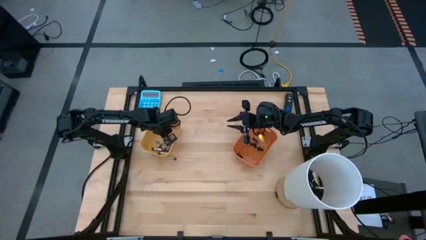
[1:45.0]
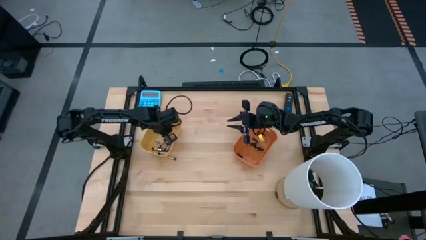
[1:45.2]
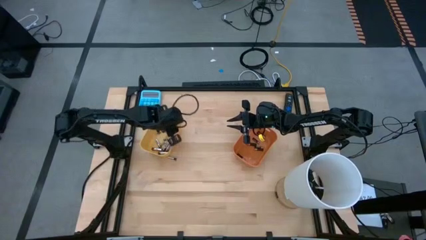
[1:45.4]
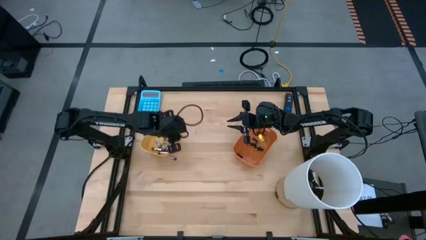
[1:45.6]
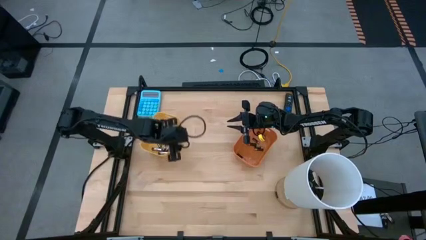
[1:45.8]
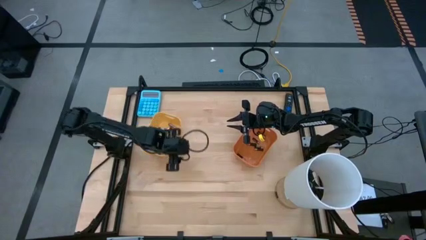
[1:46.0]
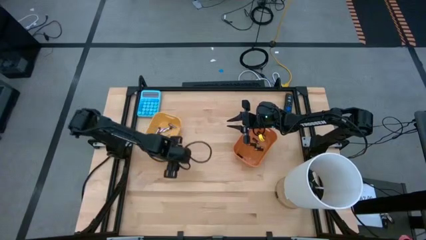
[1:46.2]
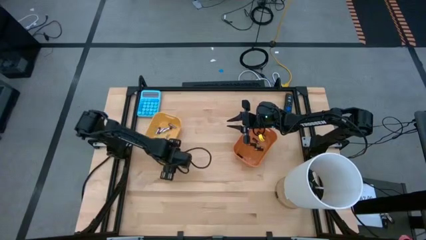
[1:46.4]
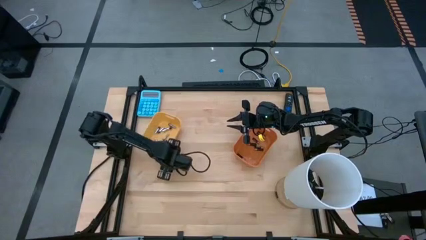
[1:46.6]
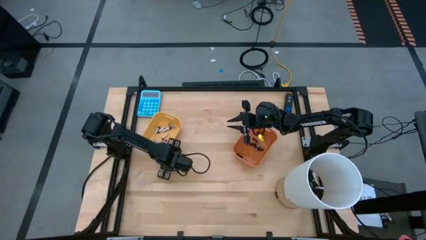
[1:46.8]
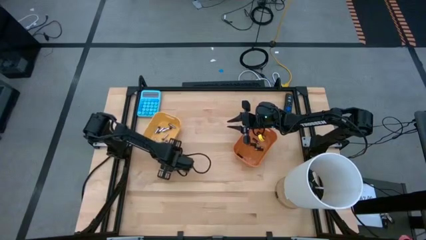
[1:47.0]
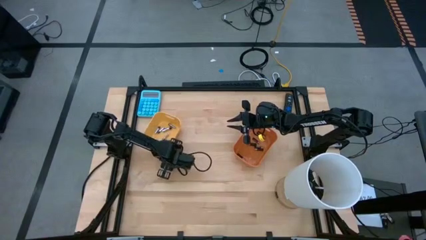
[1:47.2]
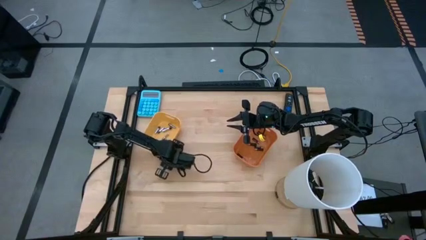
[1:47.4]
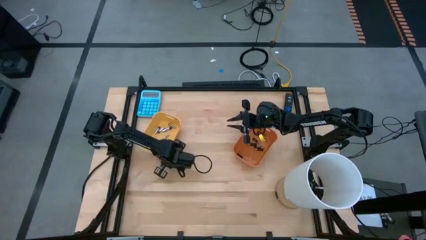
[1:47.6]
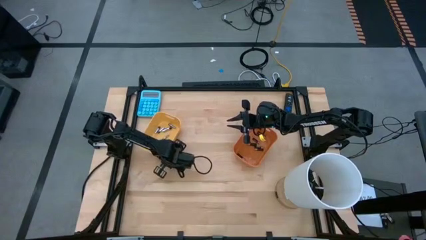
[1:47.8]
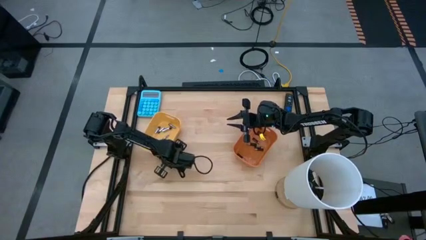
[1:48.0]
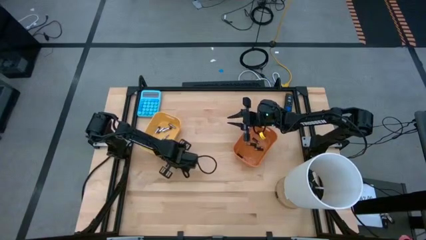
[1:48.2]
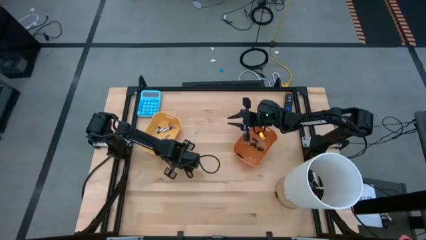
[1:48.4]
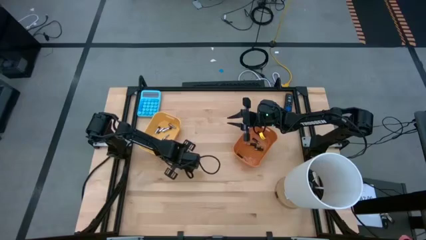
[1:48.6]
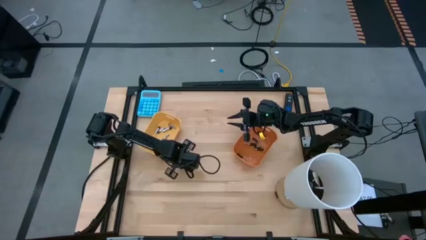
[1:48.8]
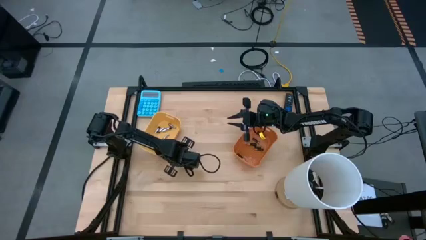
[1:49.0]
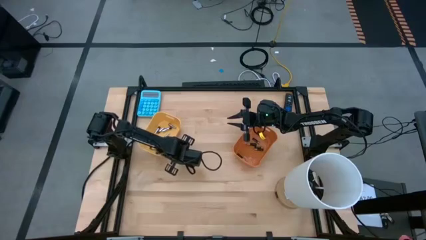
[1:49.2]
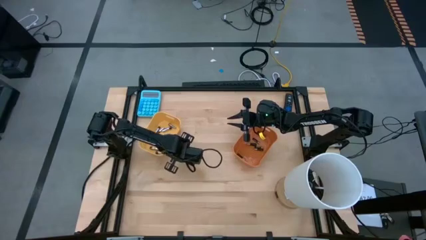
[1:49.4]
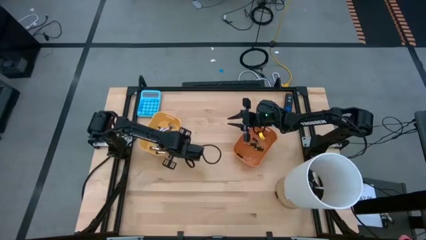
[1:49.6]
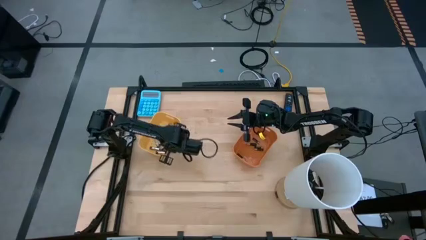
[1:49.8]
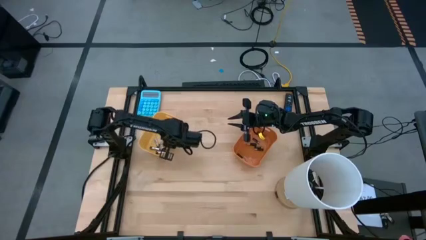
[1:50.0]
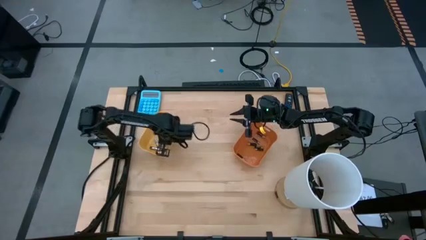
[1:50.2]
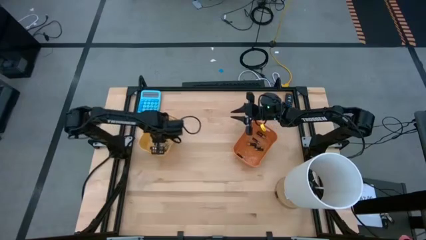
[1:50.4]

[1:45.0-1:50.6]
Task: Sort batteries
Put the silver battery into the yellow bin

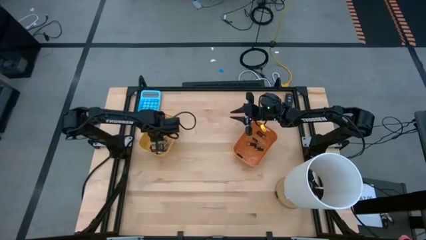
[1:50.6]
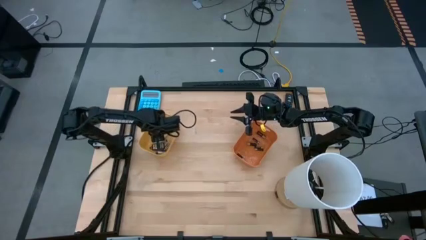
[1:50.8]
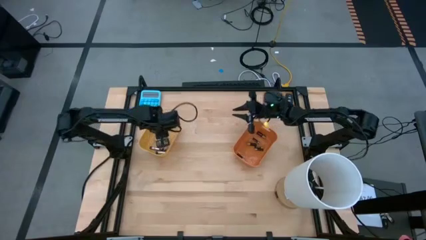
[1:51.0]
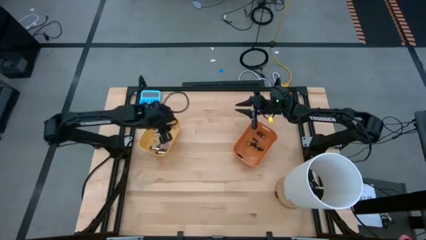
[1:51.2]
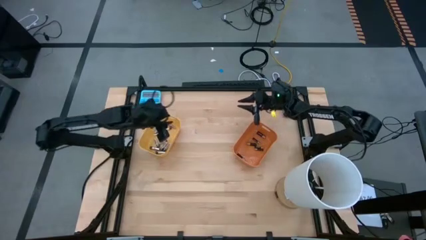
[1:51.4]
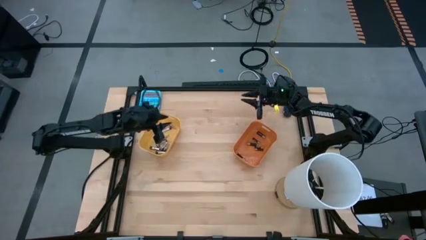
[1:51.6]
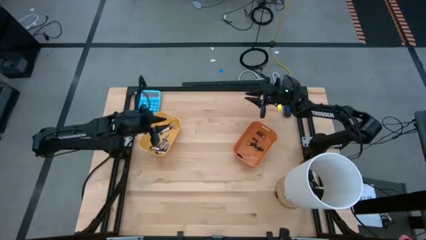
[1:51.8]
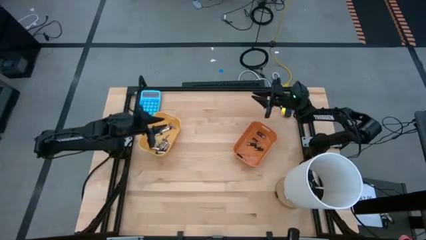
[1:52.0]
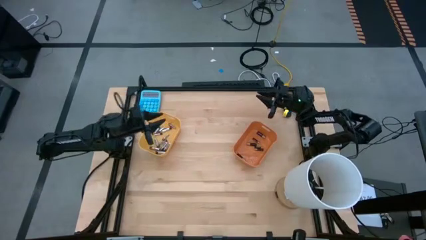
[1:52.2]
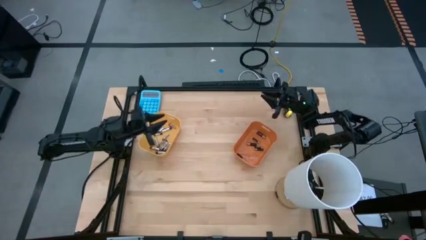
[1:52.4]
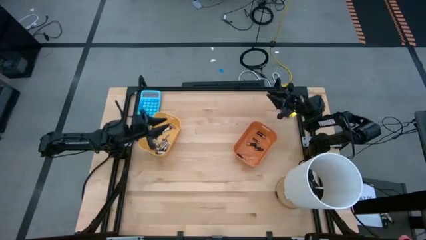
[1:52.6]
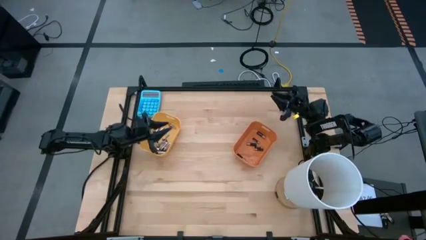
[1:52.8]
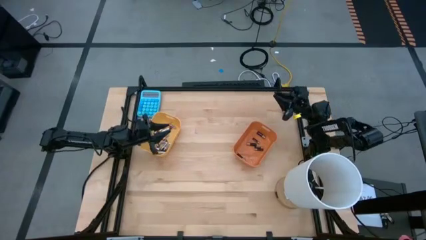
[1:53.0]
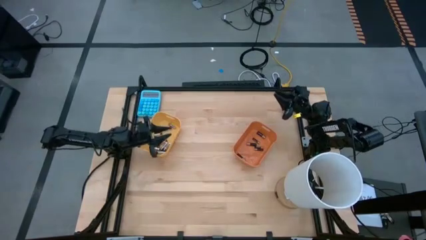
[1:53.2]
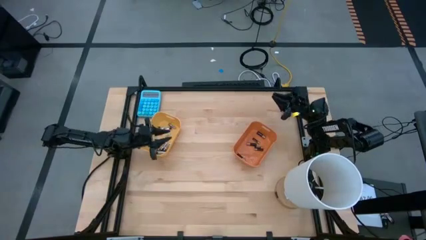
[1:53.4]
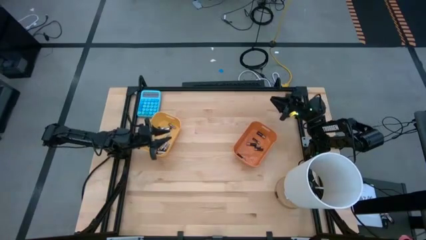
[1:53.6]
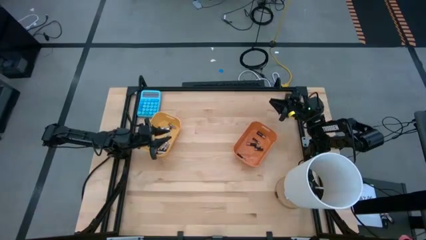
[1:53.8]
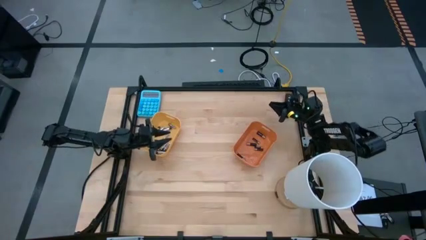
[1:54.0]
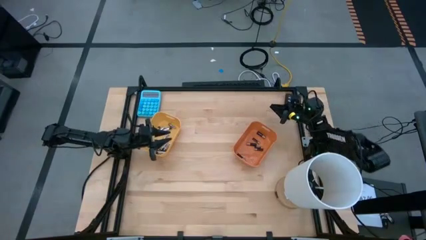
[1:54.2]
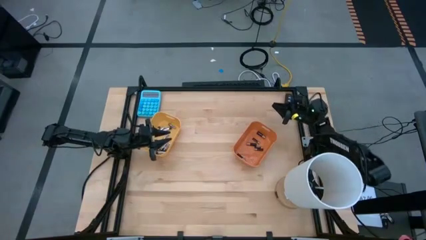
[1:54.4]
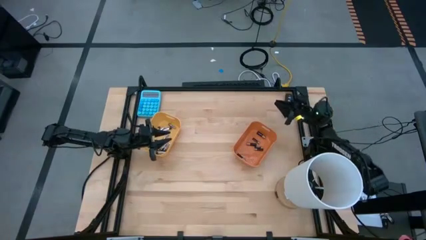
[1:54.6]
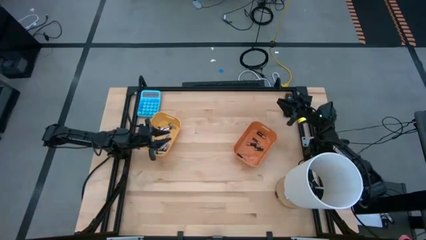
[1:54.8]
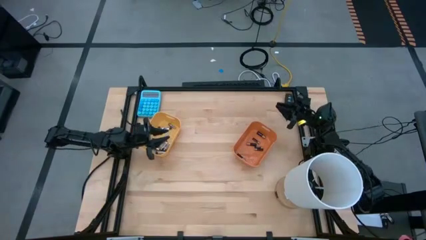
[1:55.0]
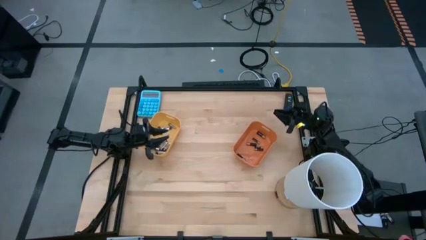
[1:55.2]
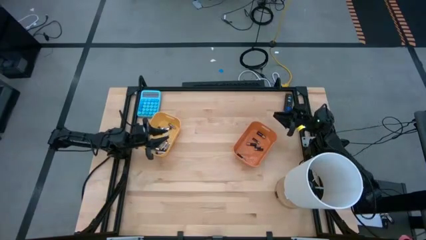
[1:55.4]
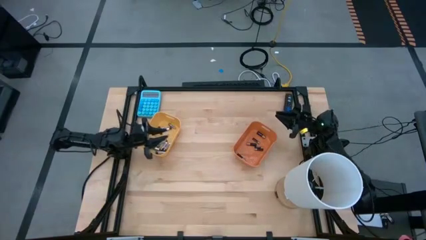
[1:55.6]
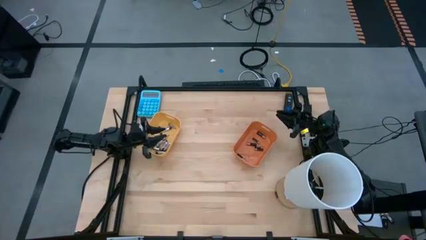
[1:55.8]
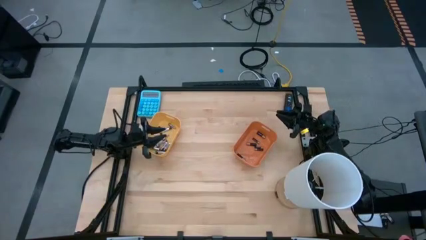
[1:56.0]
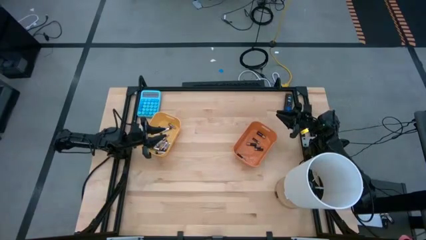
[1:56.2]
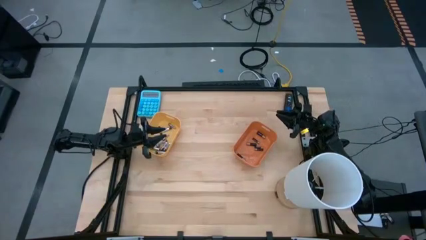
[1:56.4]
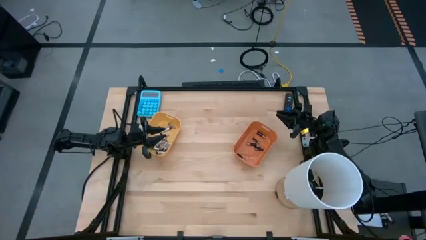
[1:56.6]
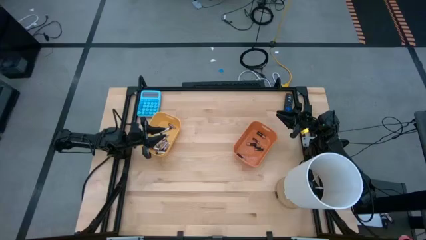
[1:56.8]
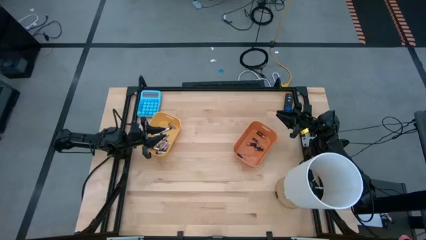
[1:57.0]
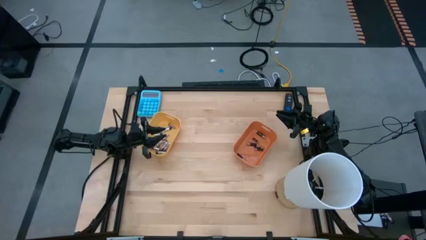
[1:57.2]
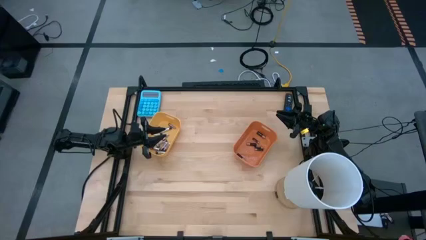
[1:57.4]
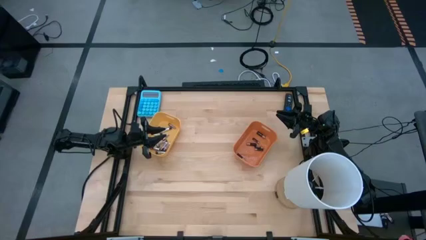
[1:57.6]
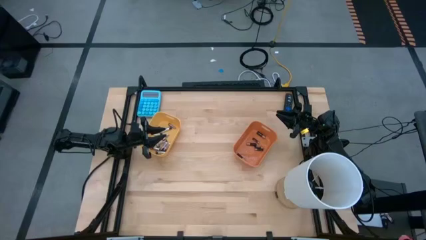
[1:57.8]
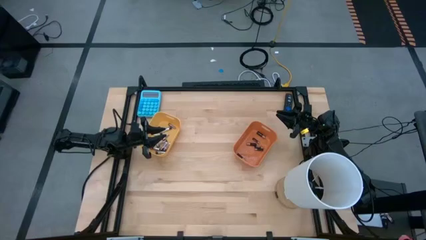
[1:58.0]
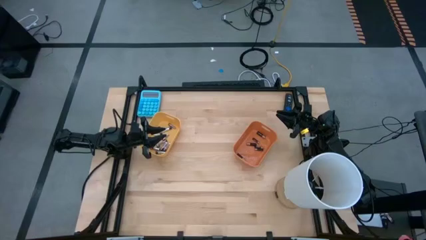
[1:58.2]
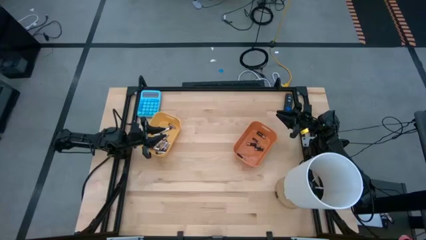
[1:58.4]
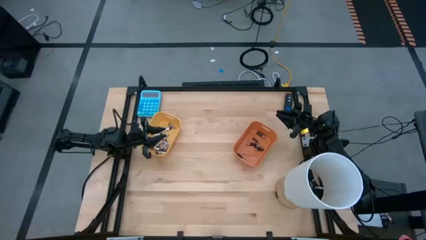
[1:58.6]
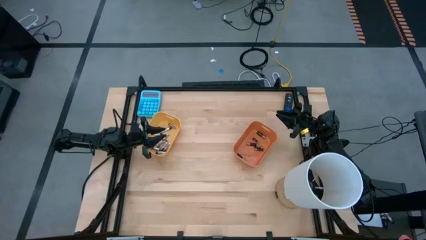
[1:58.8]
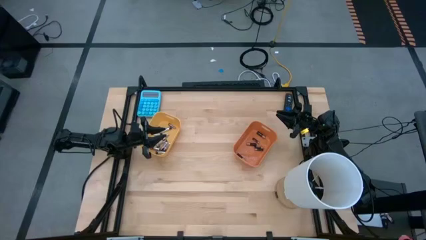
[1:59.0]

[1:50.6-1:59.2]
Return to Home Position

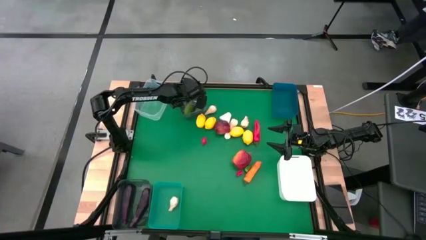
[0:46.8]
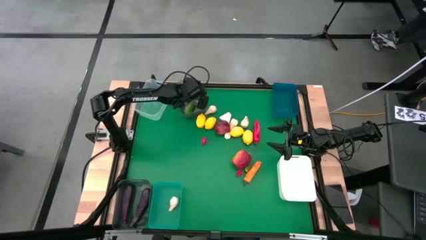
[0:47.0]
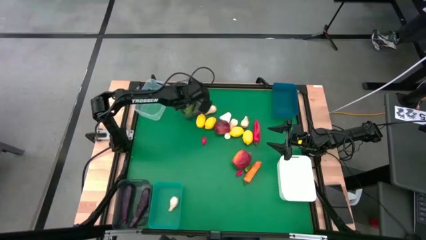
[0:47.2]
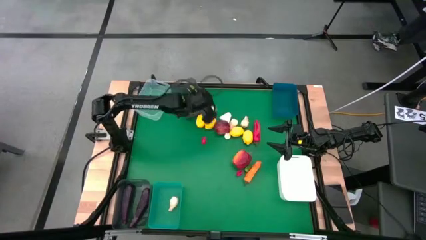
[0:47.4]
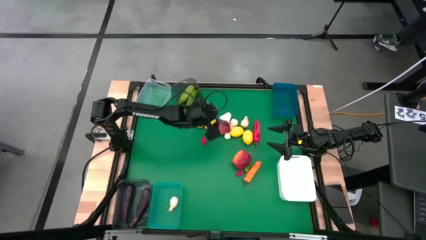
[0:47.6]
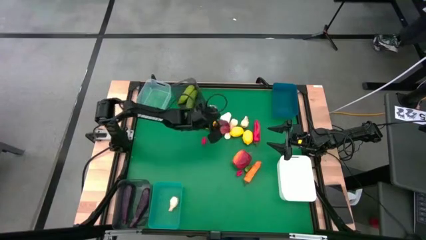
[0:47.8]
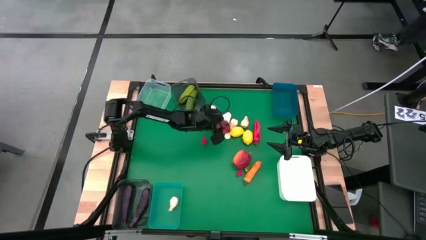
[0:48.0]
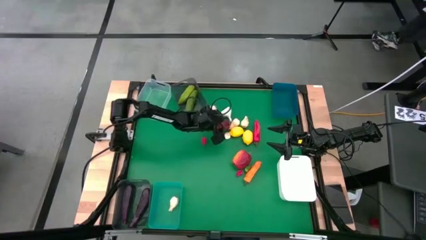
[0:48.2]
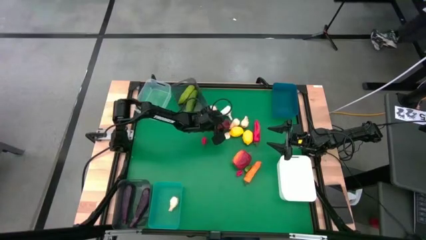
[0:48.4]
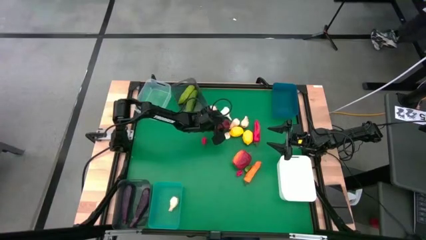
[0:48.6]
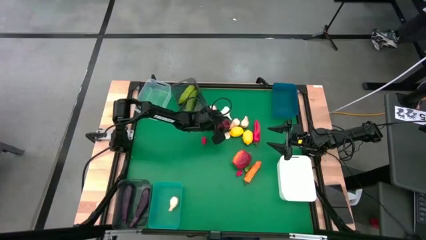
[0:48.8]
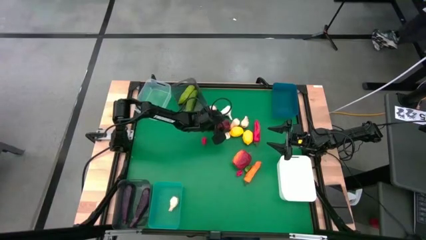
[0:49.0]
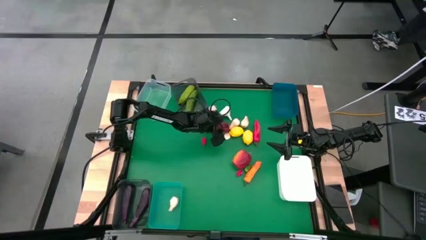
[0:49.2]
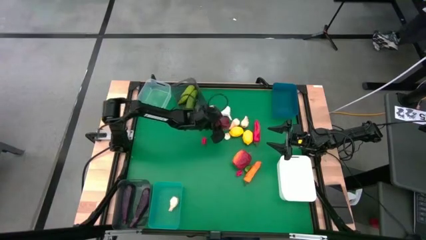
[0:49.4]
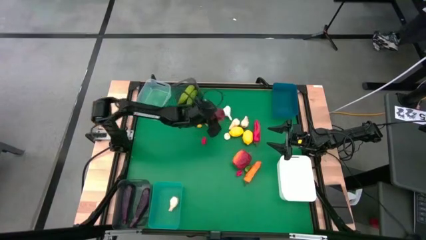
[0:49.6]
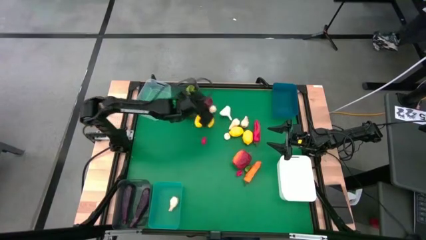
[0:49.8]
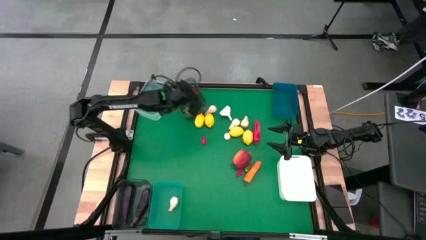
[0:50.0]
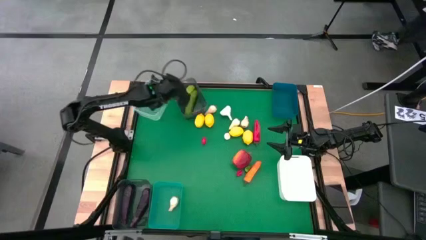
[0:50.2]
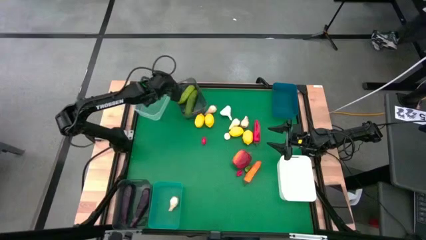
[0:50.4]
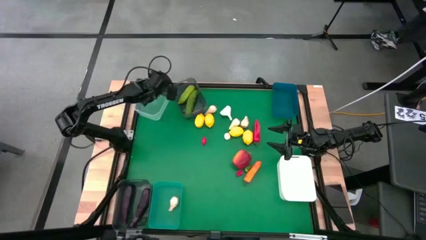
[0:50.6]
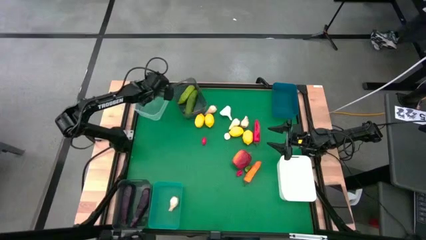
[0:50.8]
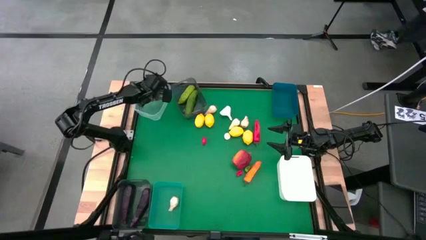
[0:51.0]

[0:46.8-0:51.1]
Task: Sort produce into baskets
Put the apple into the transparent bin
